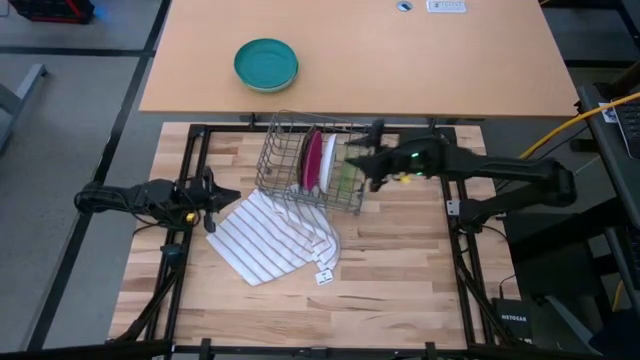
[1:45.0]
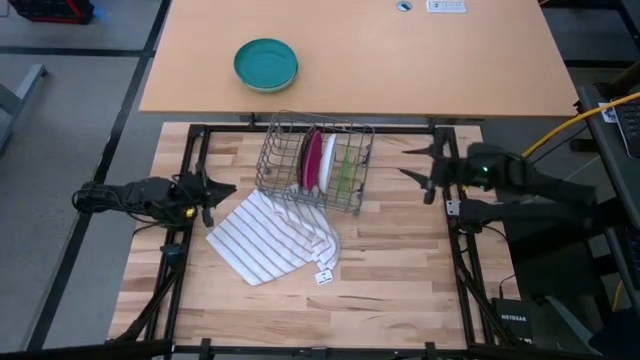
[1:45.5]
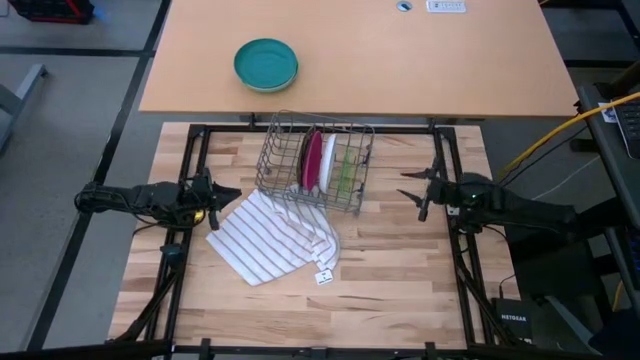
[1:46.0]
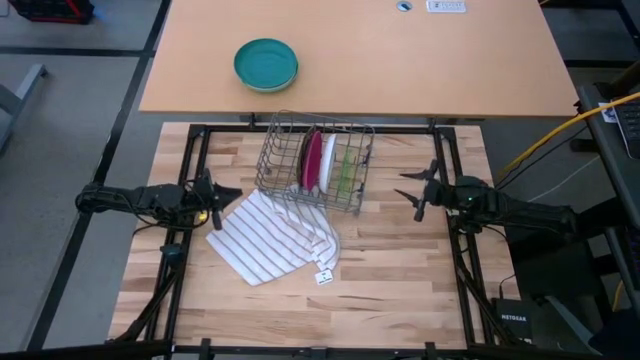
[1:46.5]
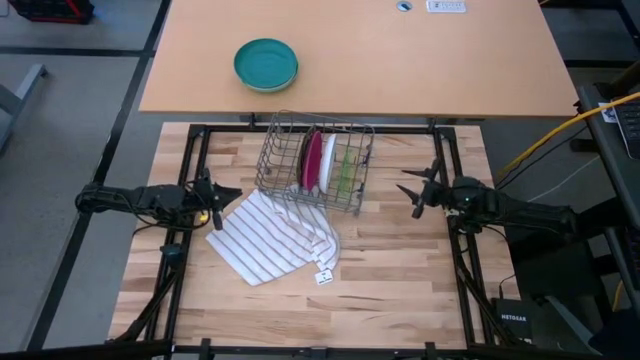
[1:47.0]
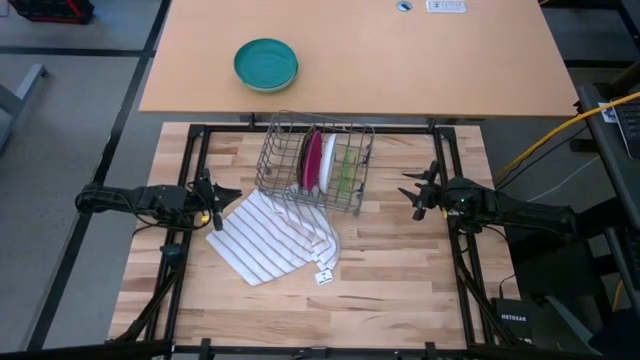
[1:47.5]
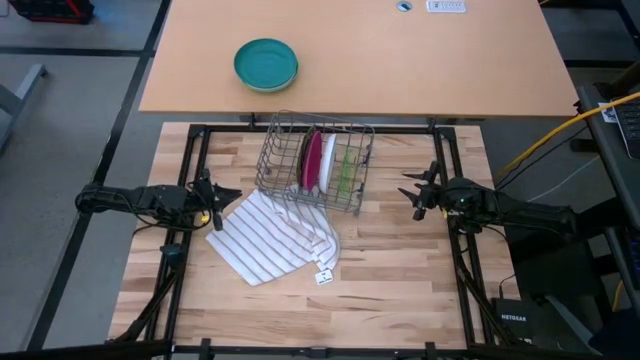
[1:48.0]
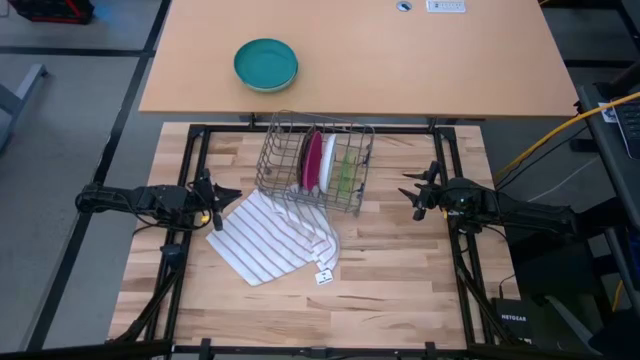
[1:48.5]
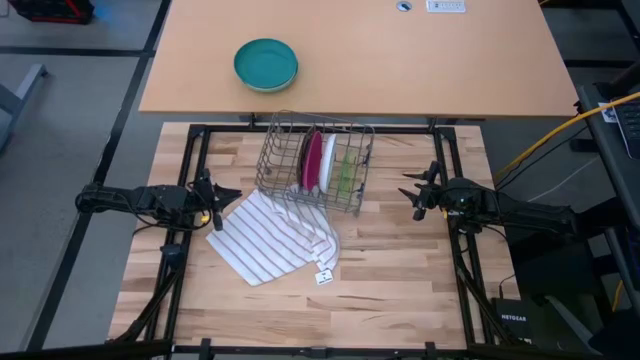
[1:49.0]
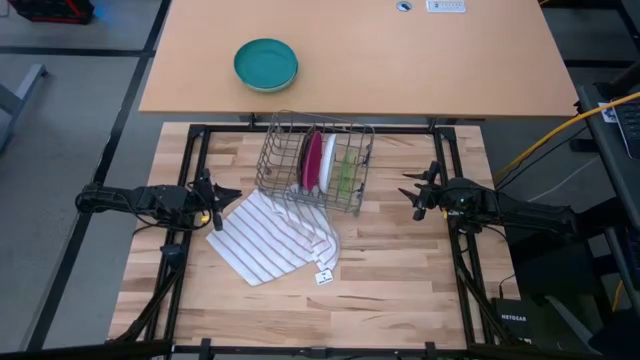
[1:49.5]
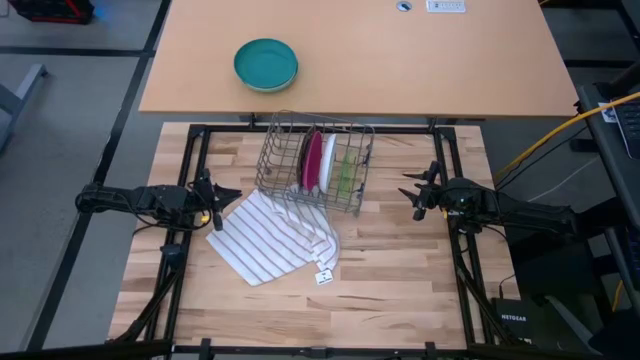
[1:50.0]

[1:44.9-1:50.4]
Task: Sort dishes
Return to Home Position

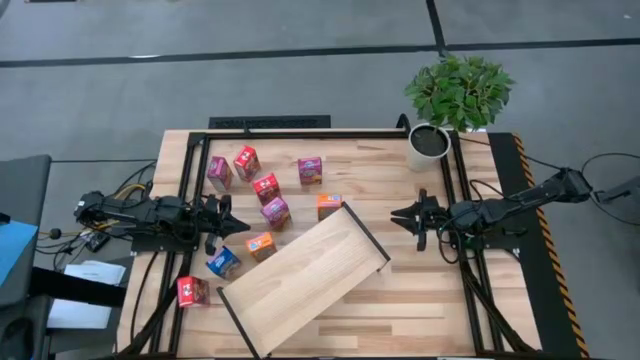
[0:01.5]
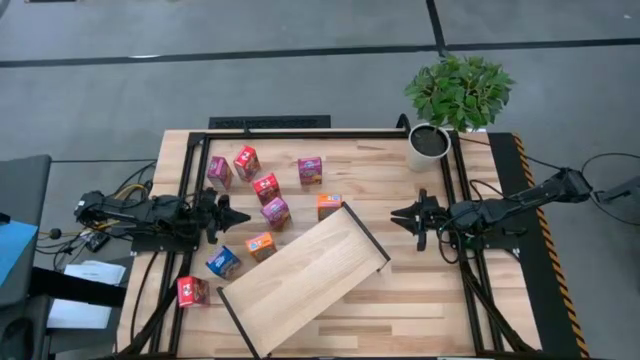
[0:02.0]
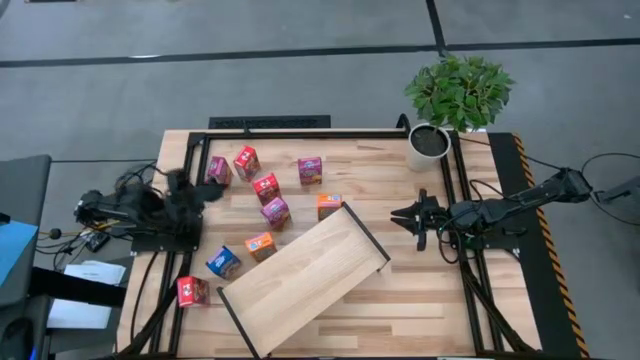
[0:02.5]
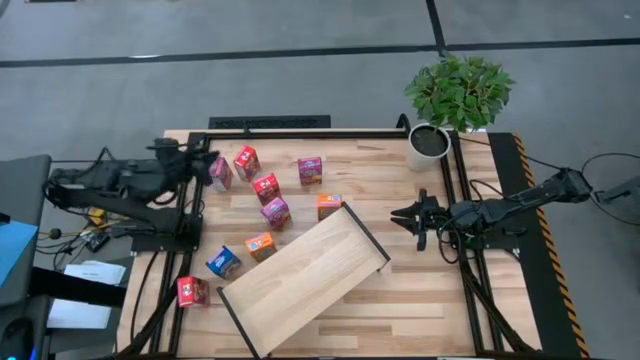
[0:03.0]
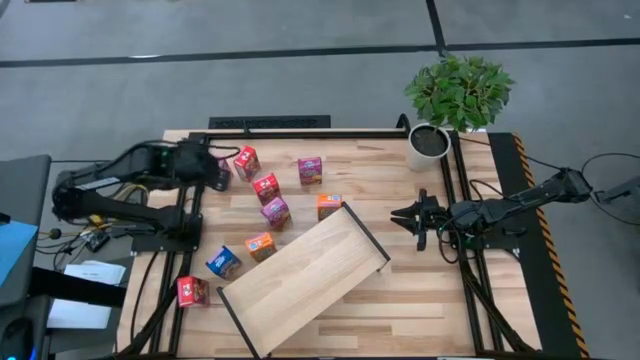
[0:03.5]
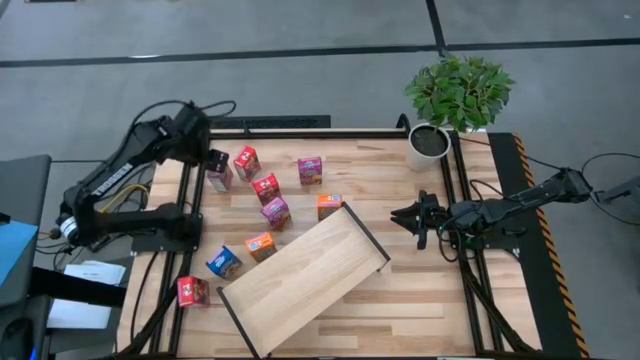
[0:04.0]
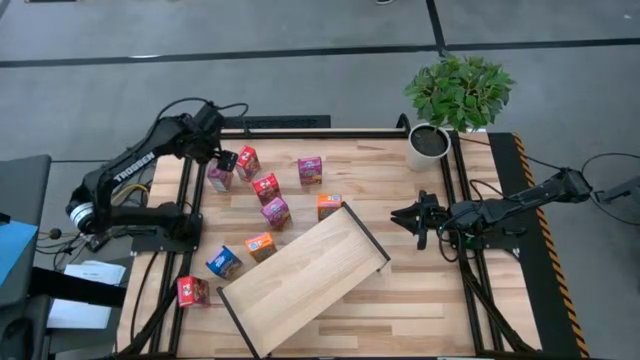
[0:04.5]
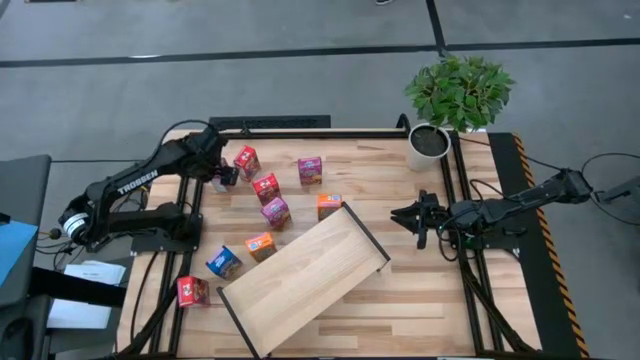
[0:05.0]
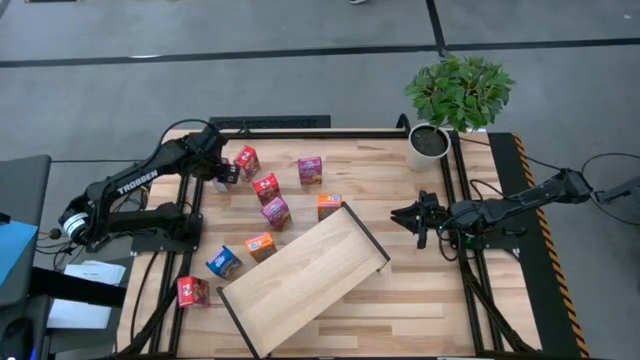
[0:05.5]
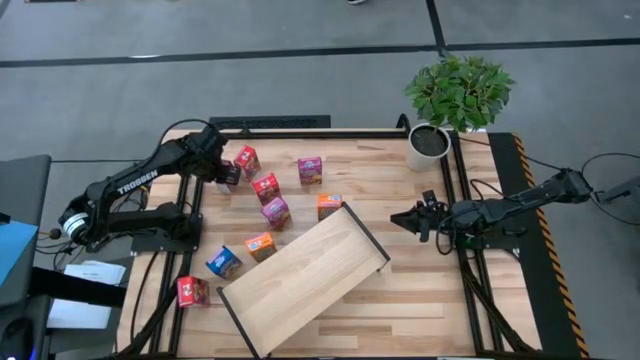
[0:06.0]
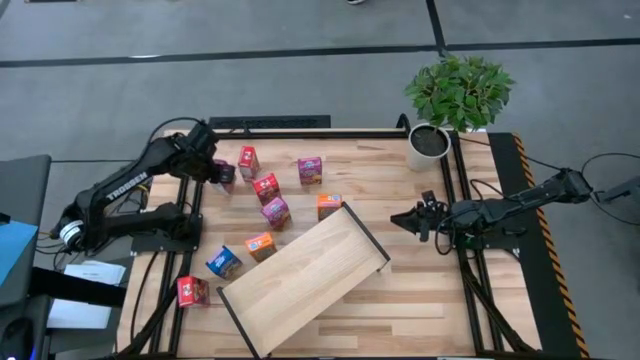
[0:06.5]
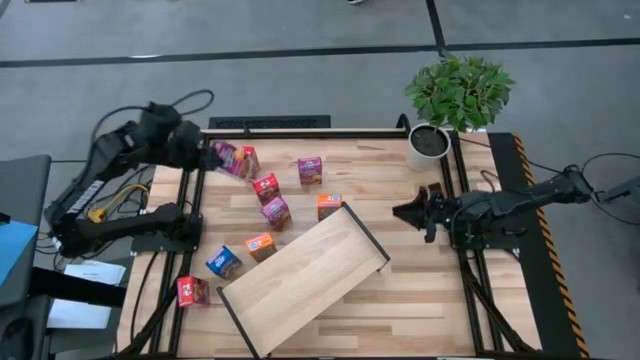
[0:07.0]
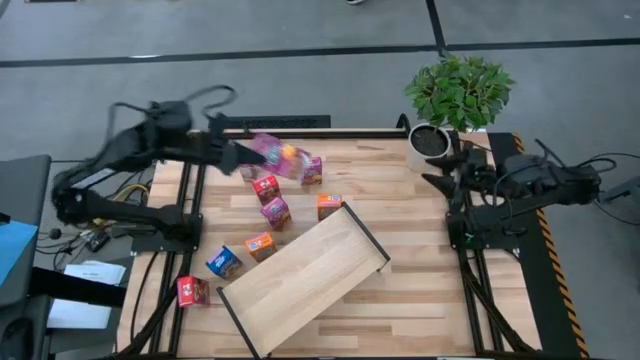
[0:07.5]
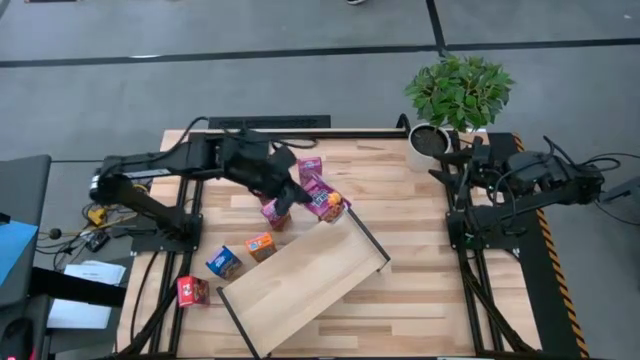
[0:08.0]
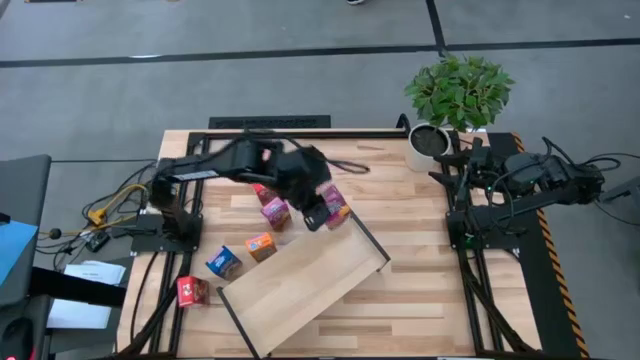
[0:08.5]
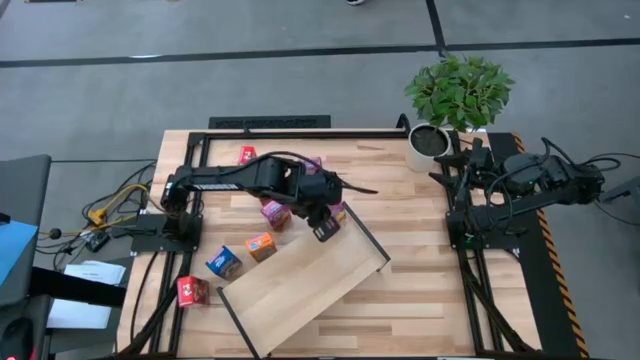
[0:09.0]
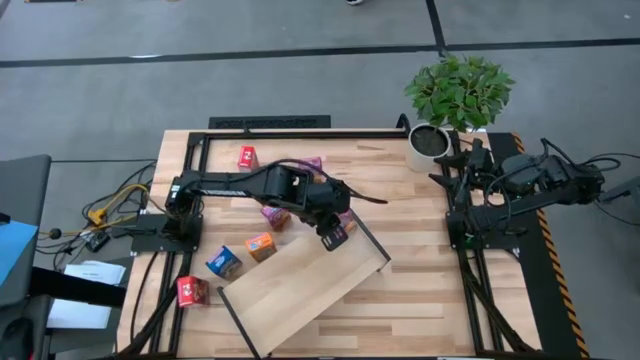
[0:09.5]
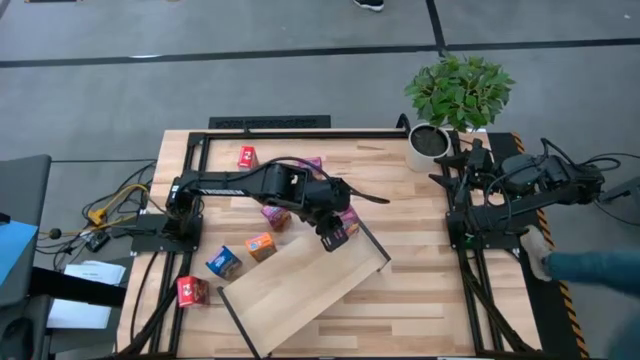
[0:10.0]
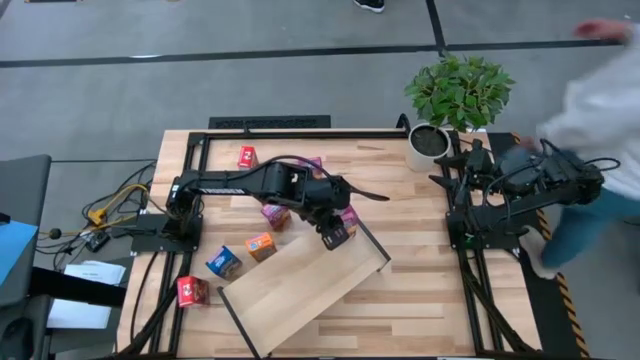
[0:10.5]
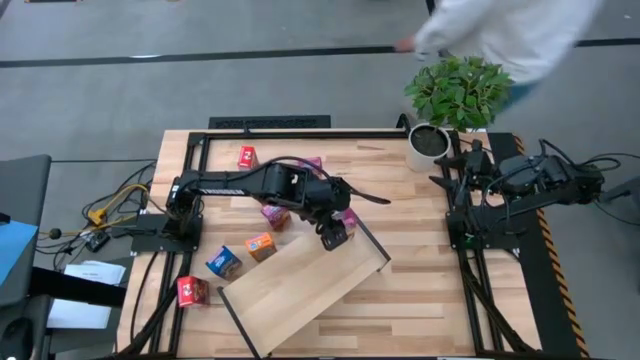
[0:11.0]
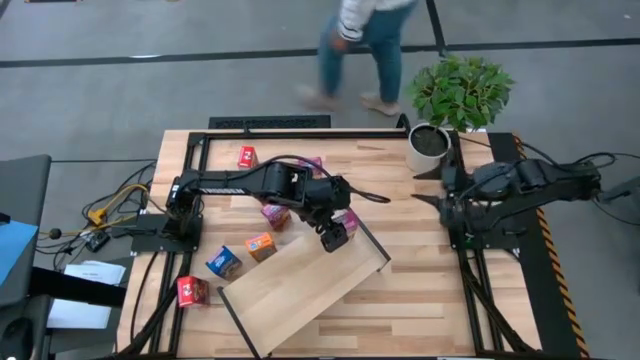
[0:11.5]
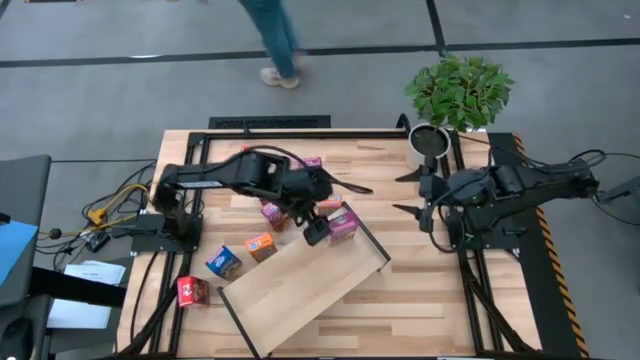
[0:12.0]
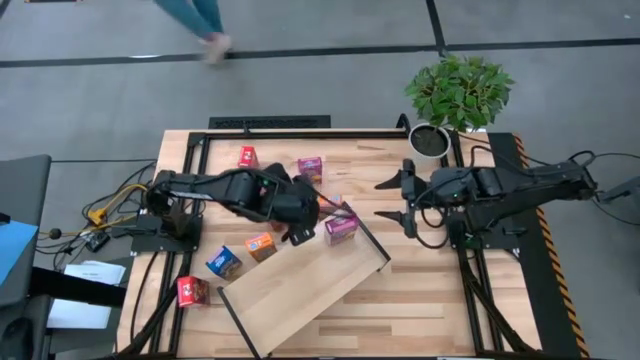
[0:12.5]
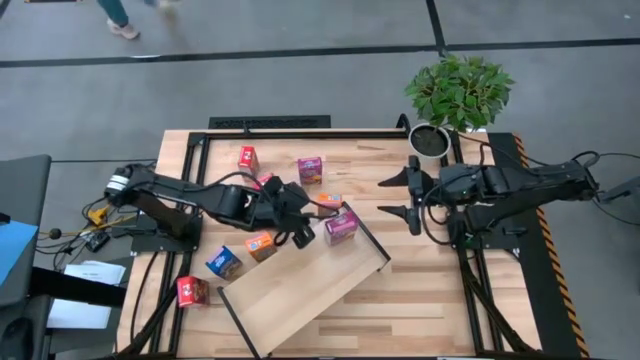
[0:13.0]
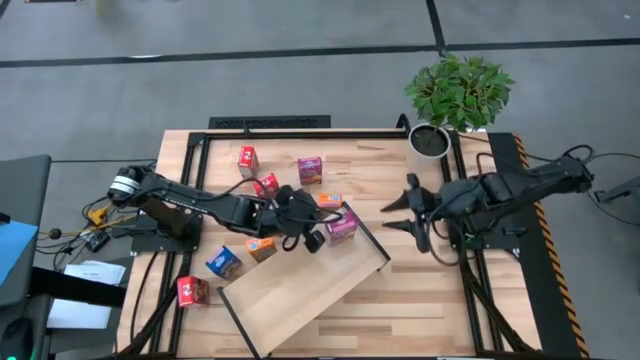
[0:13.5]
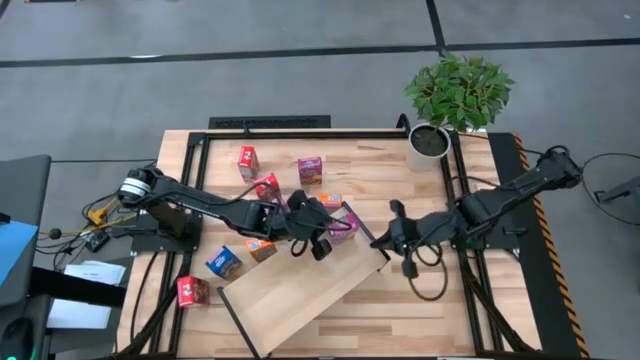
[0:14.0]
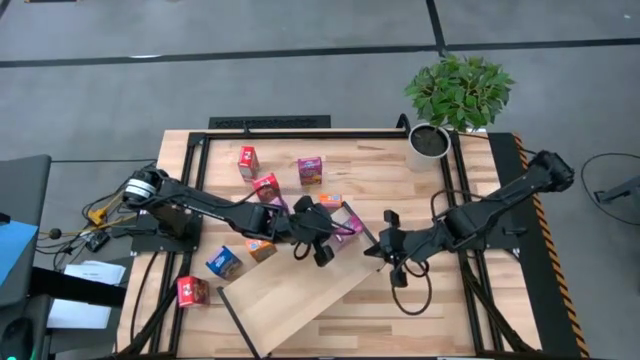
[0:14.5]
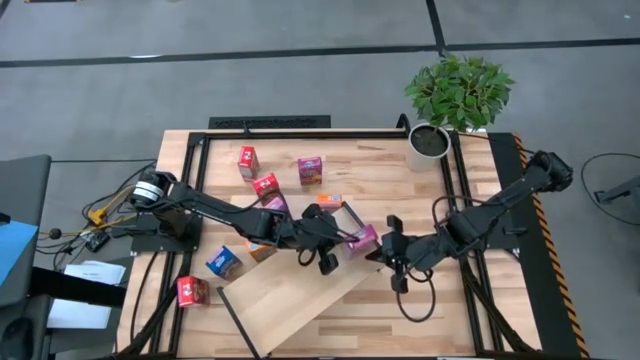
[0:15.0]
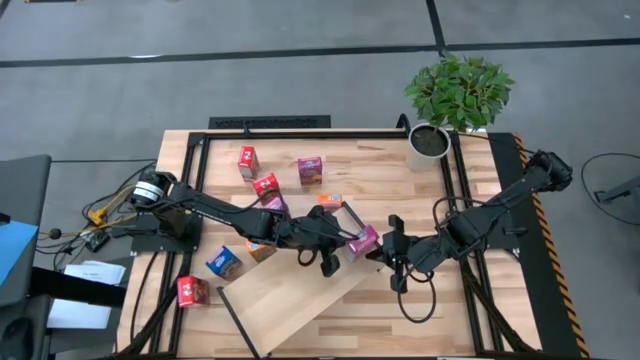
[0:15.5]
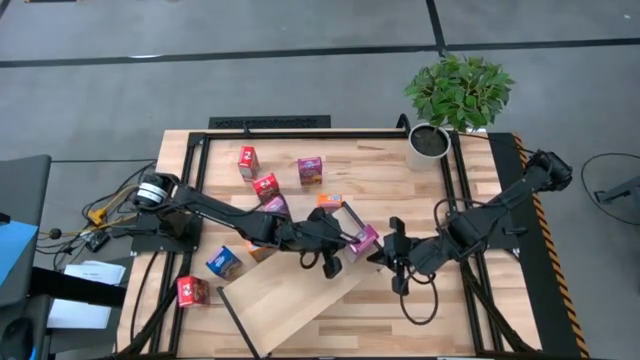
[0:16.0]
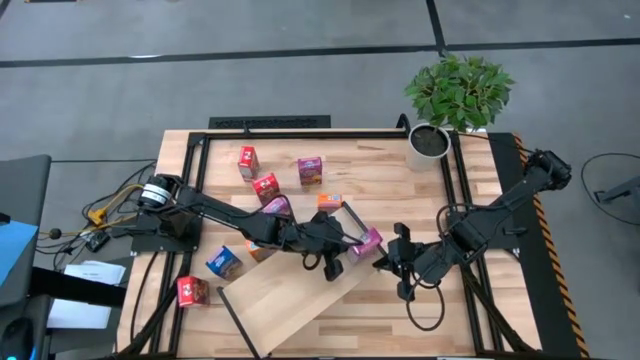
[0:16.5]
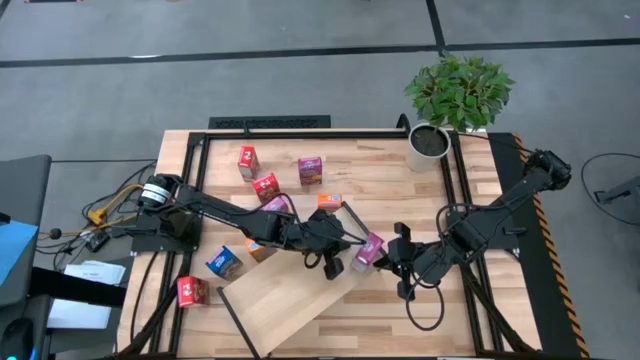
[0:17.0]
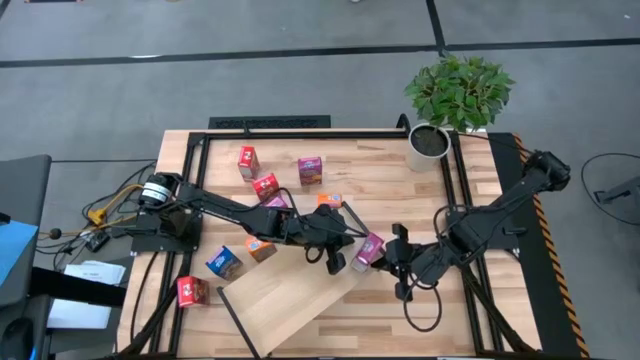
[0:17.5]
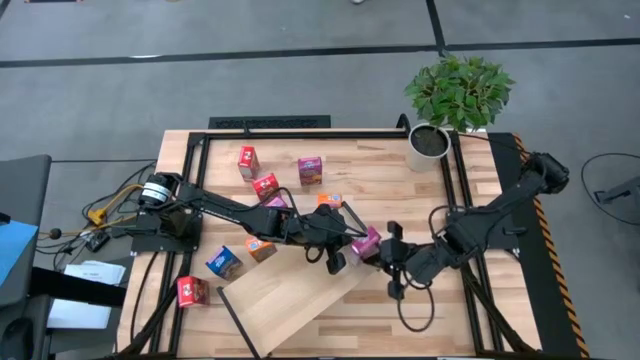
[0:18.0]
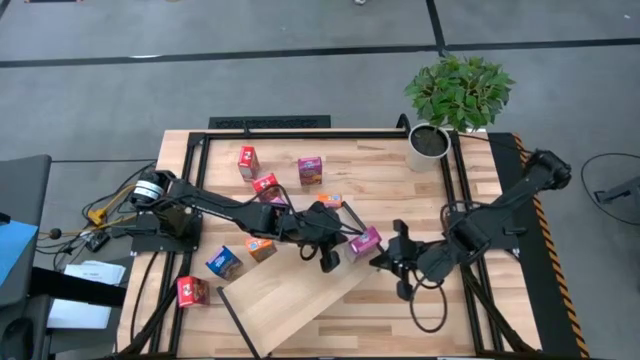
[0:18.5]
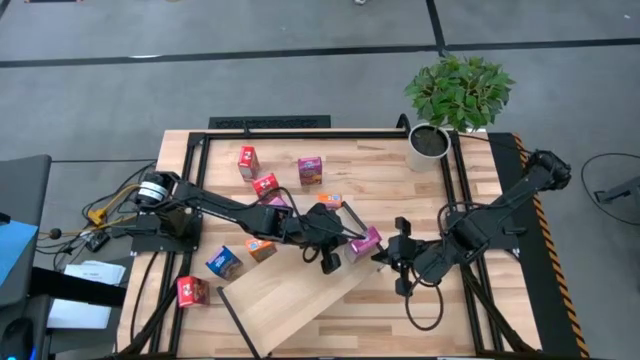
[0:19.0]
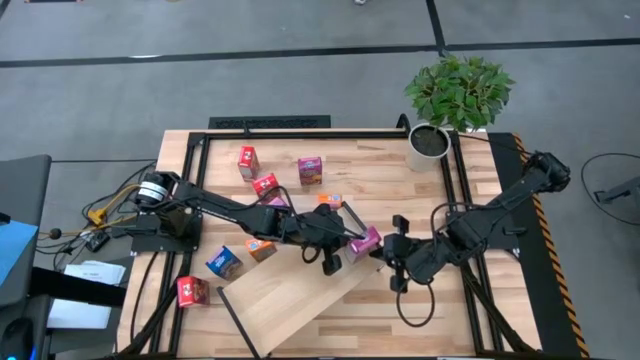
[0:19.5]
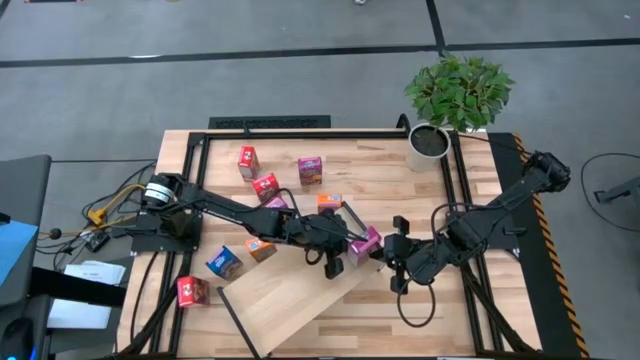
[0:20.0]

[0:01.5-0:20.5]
Task: Stack cereal on shelf
Put the left purple cereal box onto the shelf
